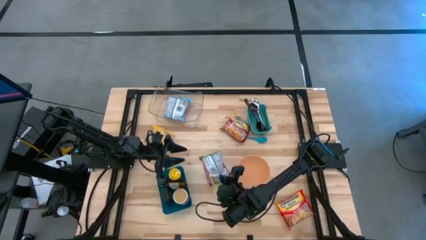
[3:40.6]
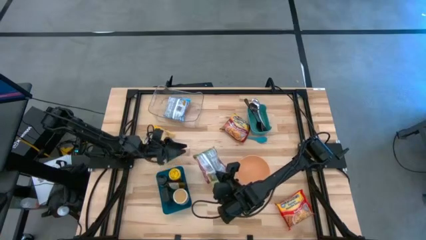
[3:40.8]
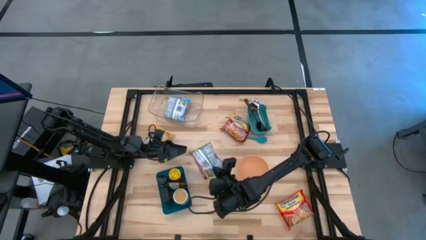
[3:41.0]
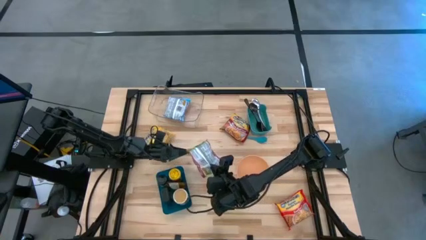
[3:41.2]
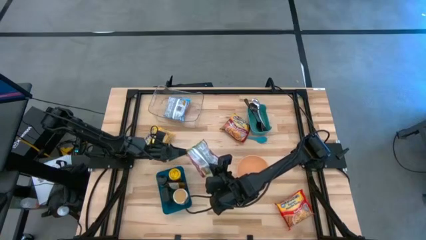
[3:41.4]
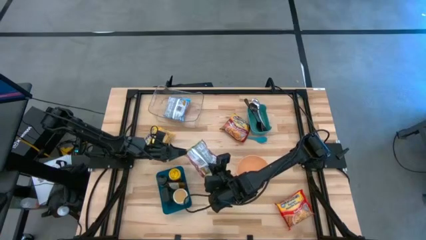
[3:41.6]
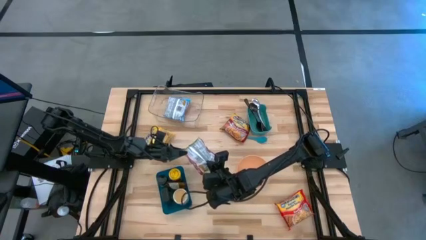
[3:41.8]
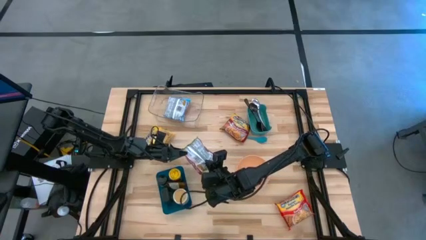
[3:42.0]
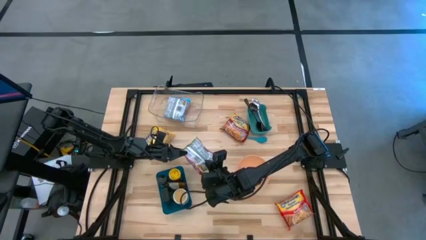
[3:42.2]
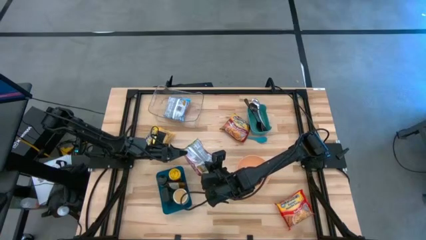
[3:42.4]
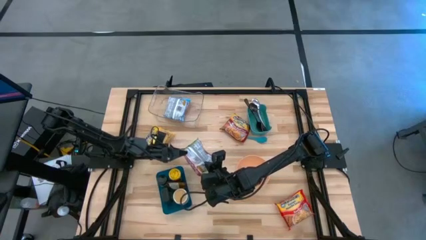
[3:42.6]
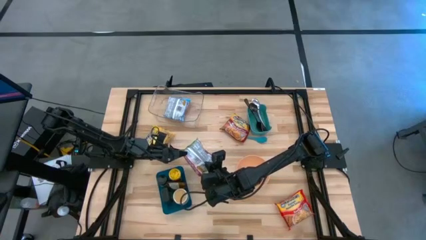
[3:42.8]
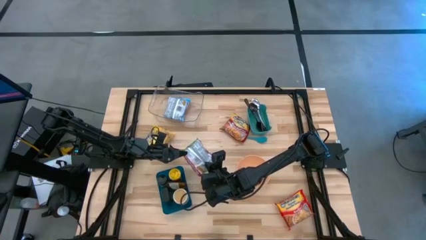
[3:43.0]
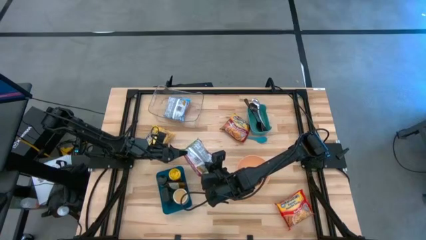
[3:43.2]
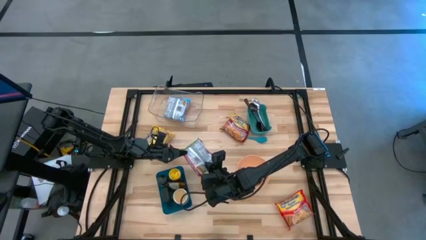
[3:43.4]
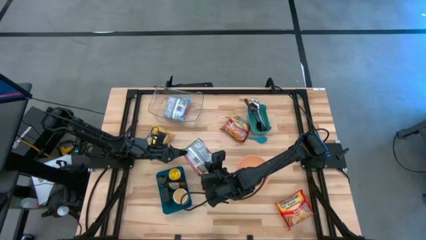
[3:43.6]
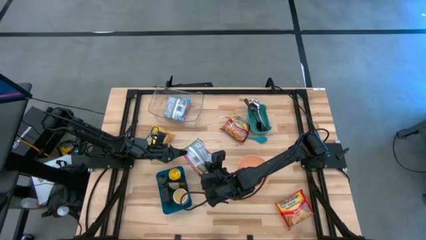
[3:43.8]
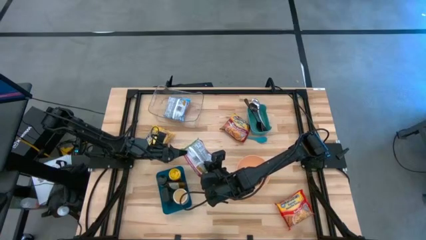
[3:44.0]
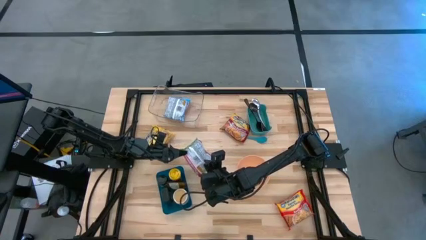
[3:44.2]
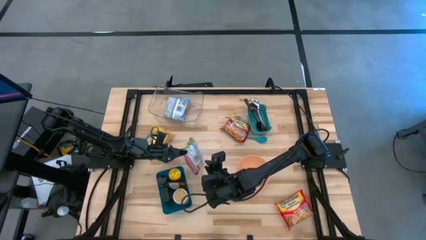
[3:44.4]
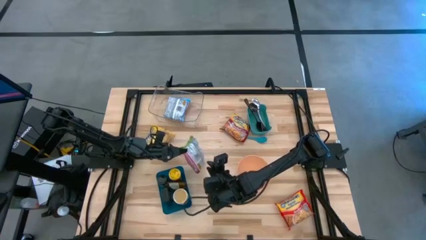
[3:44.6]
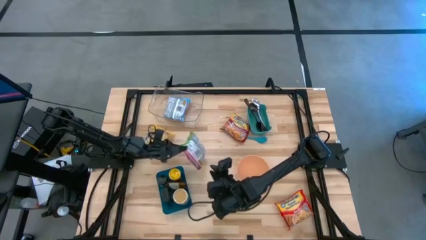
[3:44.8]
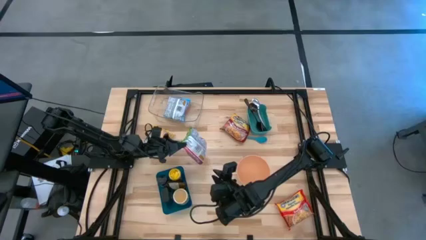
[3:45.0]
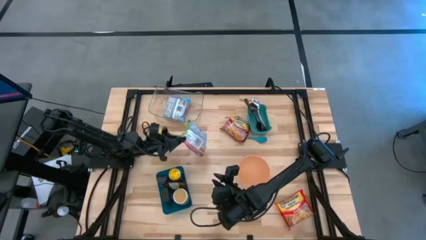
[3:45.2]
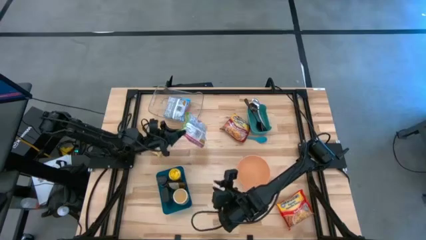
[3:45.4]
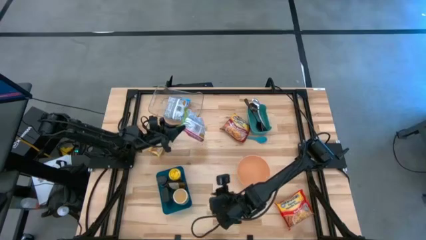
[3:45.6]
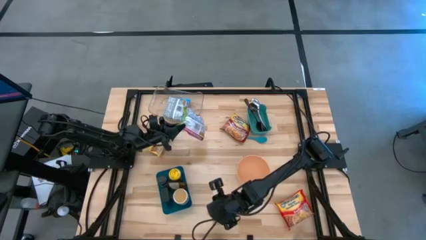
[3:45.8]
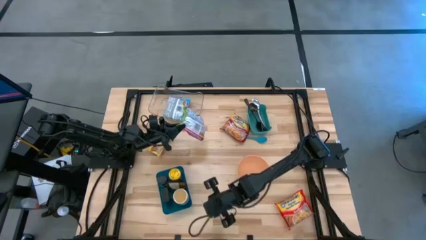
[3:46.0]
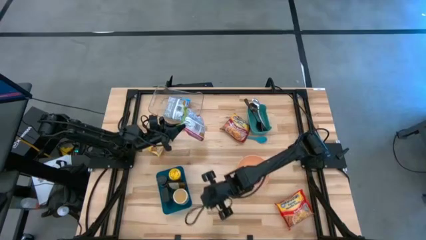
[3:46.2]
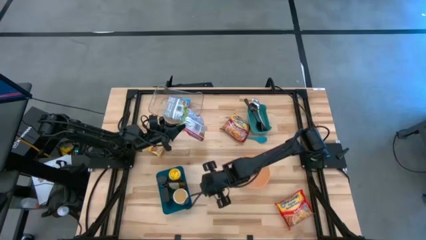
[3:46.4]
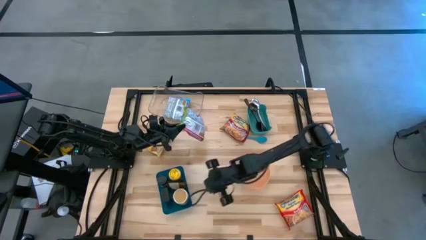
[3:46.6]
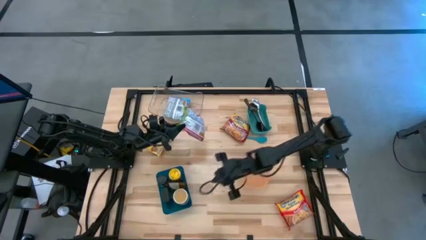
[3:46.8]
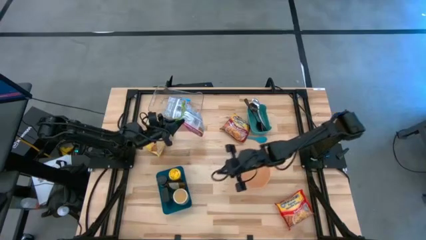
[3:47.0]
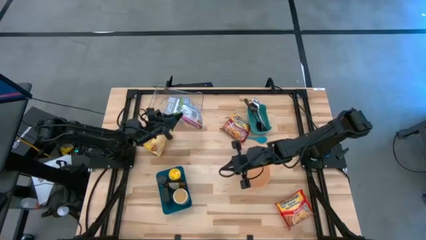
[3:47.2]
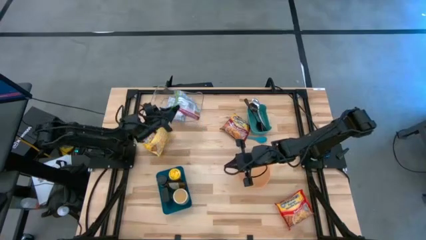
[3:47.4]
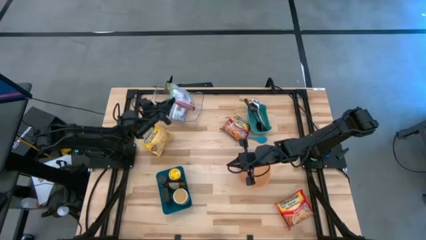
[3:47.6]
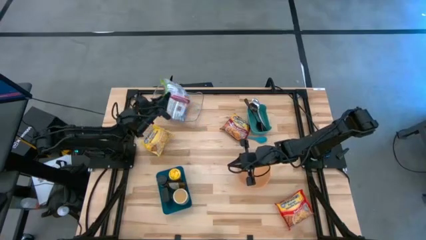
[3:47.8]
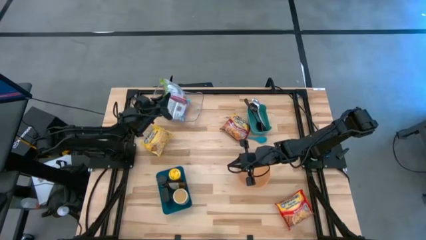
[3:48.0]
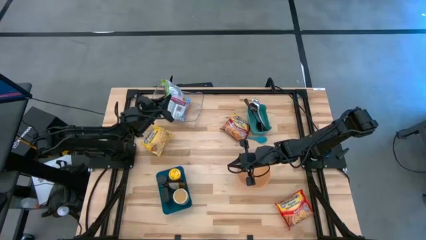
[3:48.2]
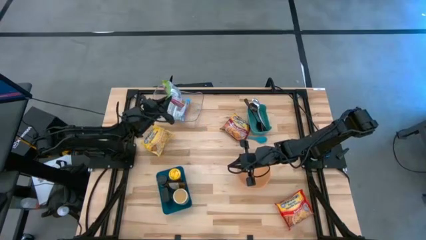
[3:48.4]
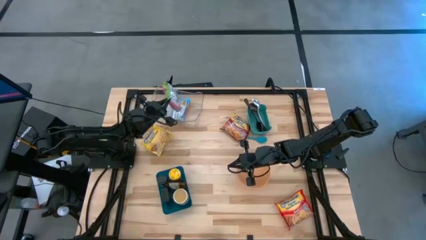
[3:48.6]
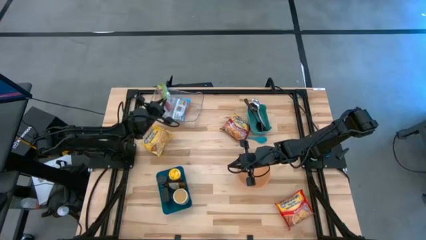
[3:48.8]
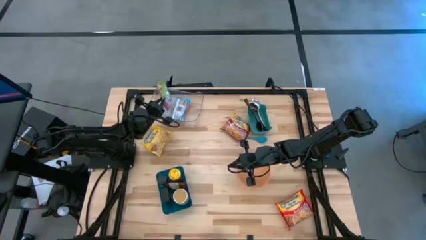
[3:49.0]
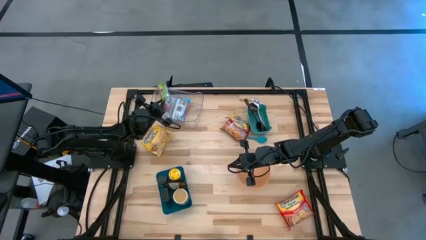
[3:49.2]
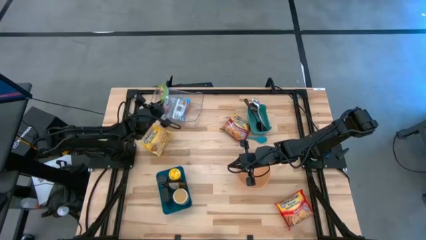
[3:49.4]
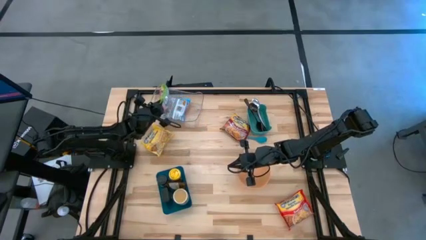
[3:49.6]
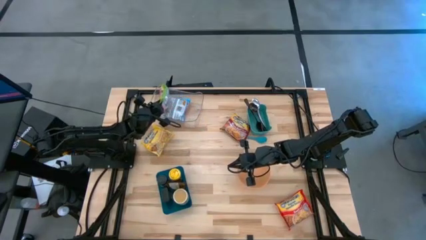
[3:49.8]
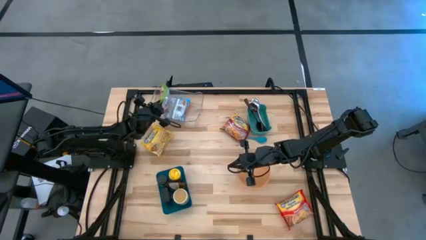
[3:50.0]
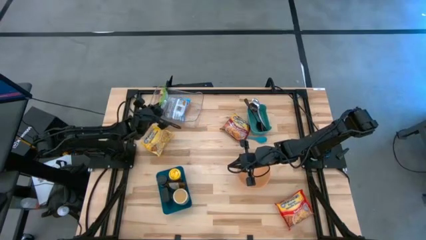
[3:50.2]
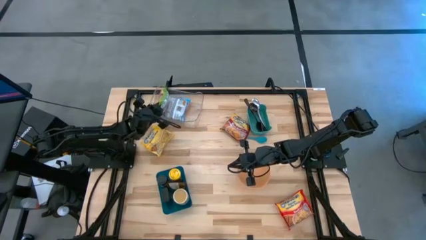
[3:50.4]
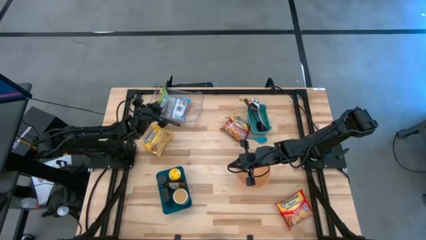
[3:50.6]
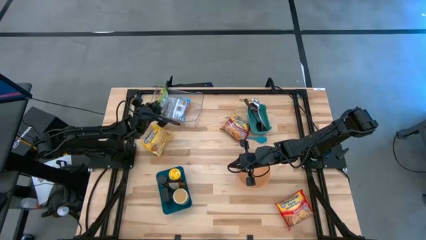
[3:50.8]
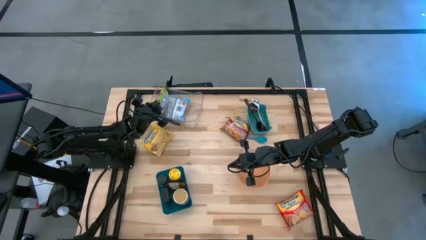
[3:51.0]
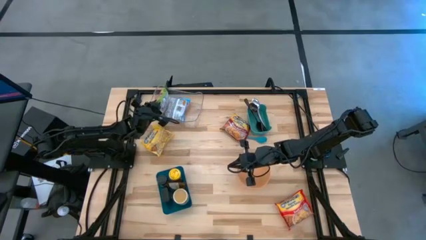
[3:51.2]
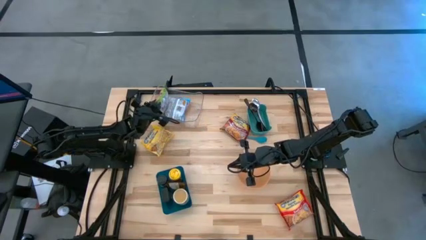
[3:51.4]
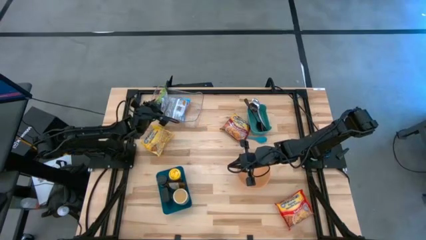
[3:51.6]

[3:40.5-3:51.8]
Task: Pick & Place Food Item
Put the green noodle pack into the transparent bin

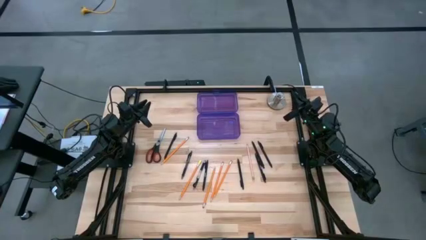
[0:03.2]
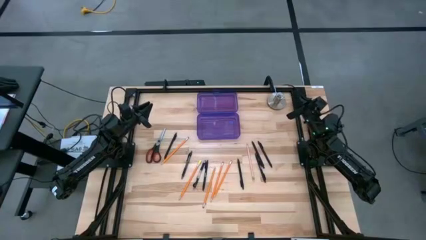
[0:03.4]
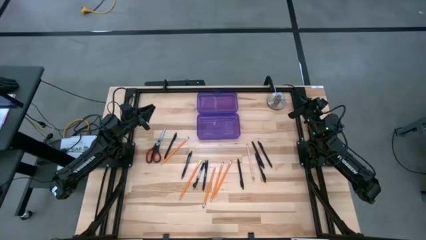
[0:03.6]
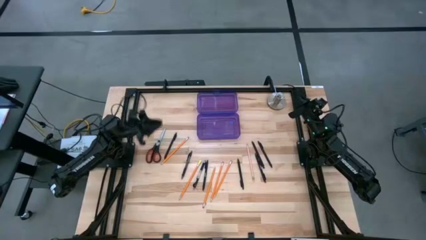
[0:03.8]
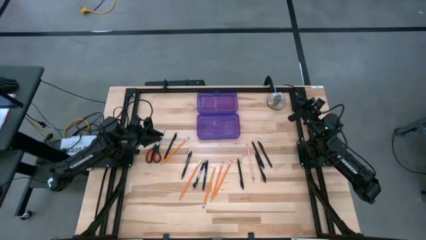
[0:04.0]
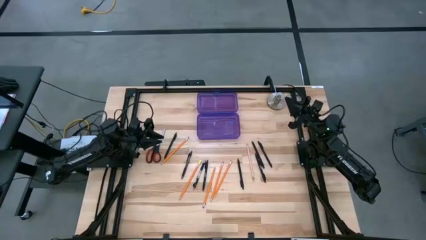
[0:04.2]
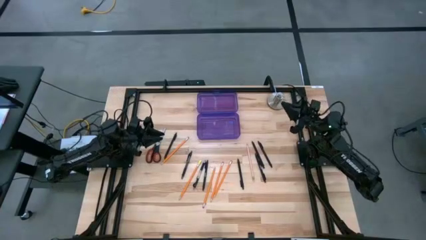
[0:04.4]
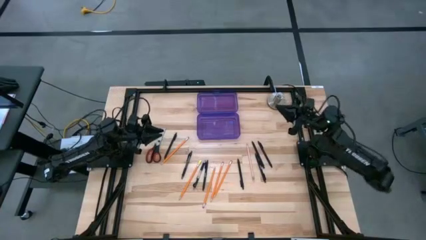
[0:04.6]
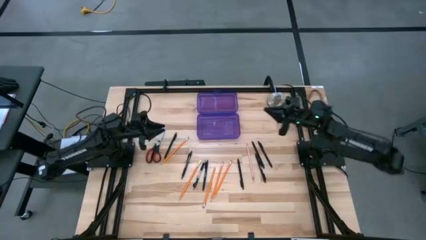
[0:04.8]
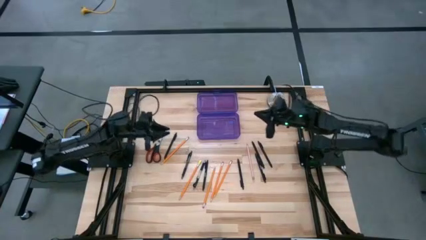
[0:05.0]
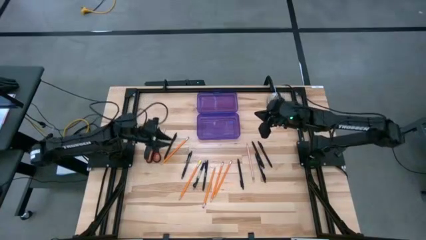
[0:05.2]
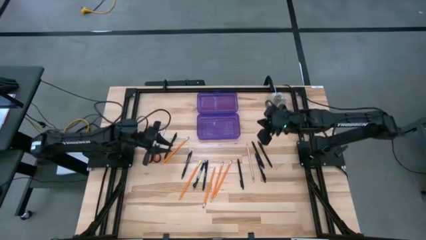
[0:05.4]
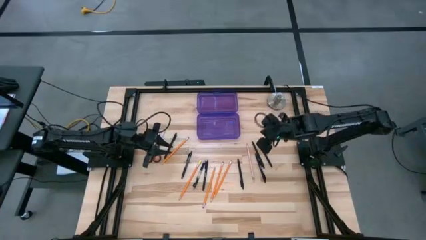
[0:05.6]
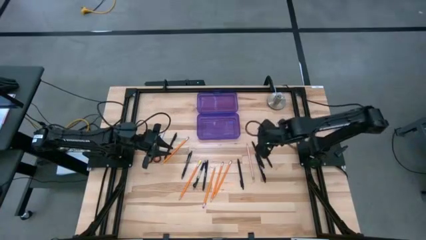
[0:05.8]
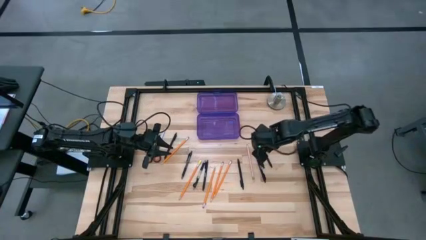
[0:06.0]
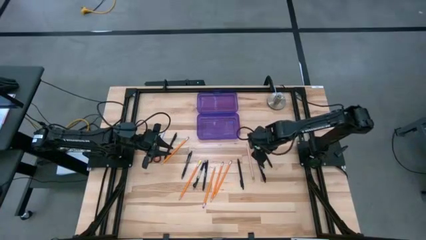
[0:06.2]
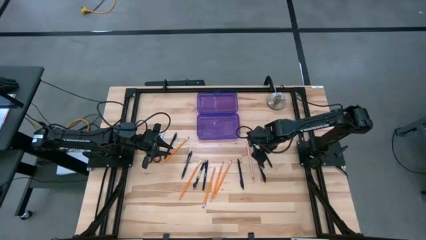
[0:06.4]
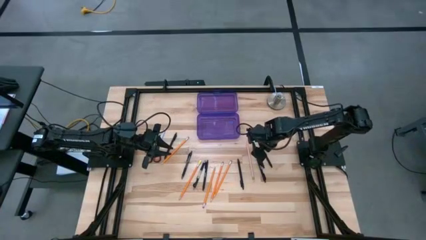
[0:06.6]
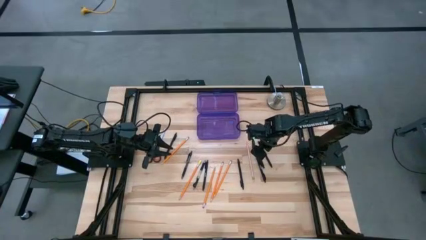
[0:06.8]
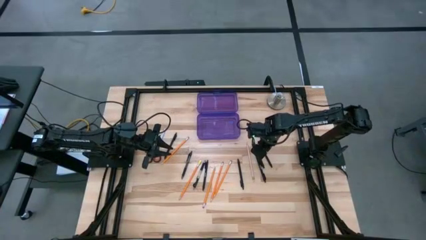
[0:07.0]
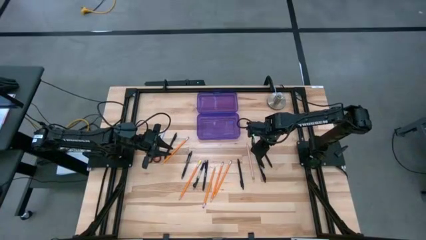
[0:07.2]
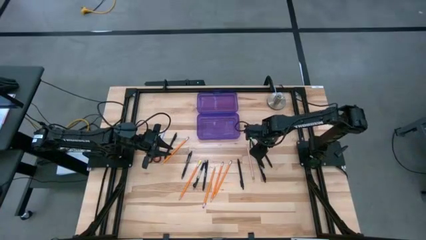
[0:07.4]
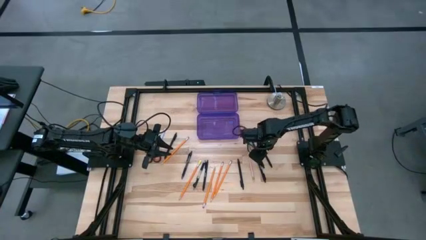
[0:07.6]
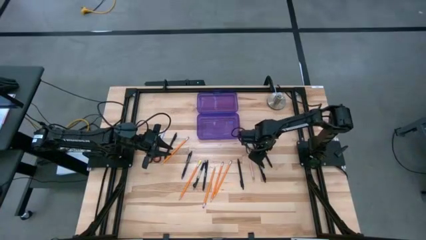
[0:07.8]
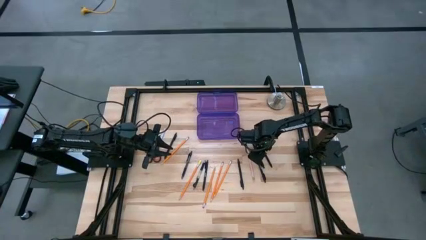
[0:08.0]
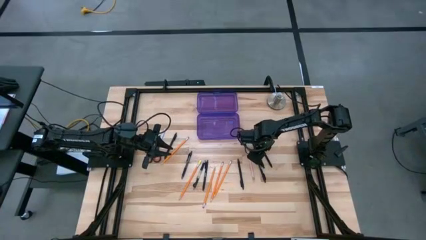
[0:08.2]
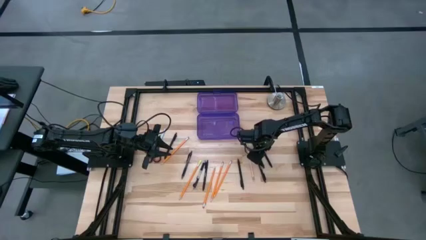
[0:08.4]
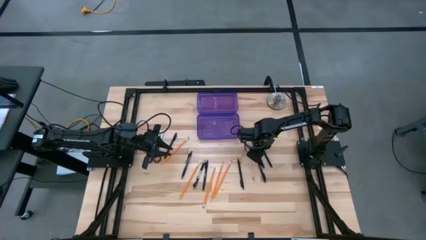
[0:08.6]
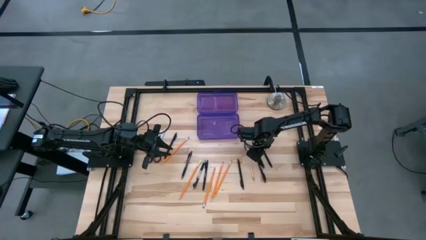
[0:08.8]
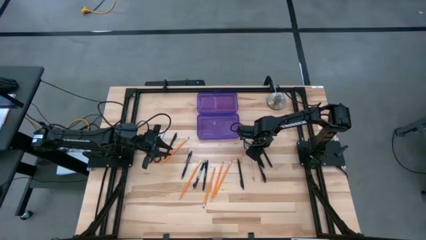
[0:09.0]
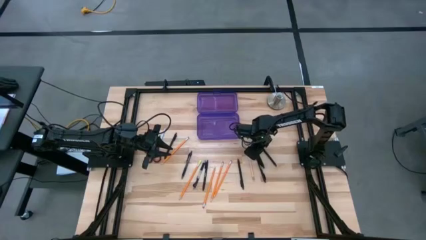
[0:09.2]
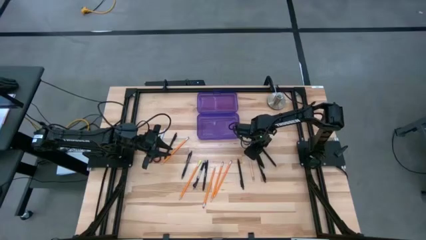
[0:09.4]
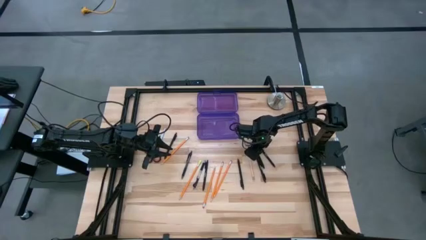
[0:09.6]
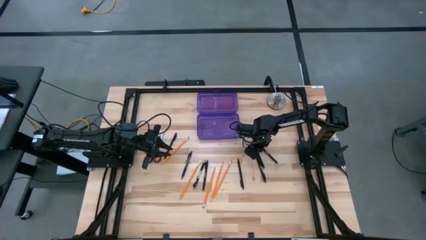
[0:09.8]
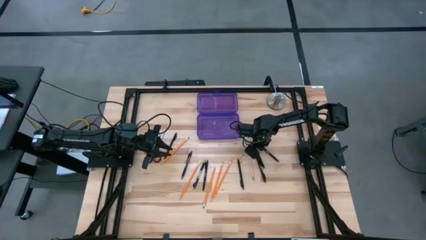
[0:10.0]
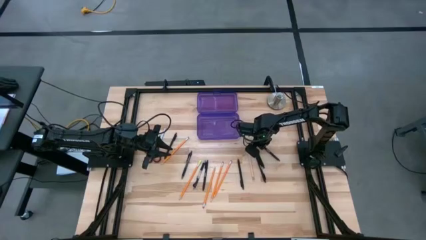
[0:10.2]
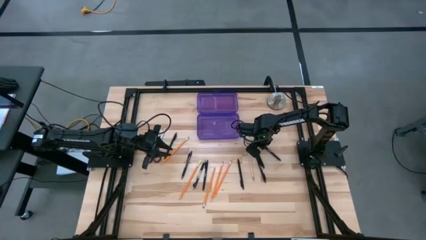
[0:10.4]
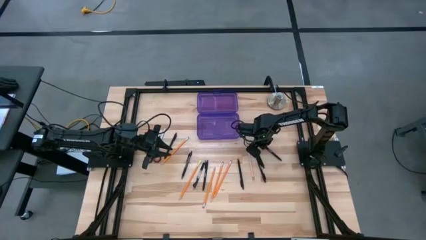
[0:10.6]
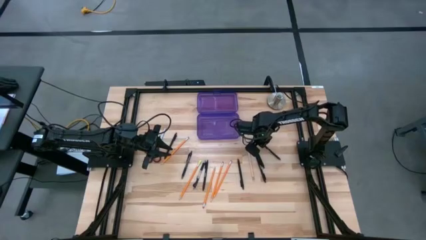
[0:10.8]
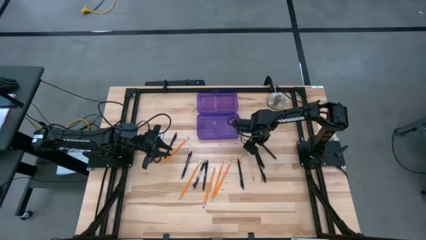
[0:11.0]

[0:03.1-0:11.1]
Task: Pick & place school supplies into a supply box
Put the black pen into the the purple supply box
